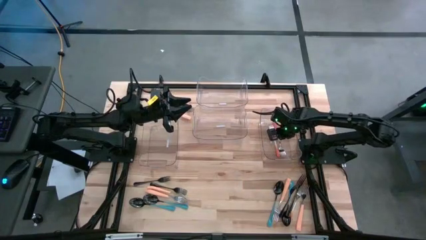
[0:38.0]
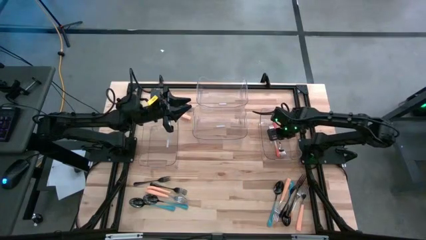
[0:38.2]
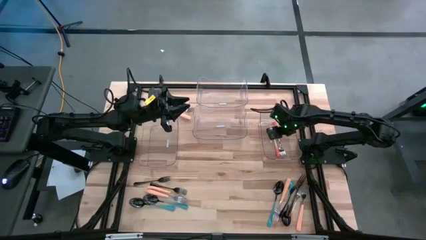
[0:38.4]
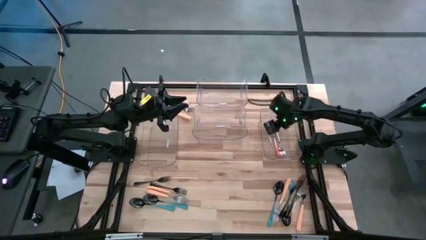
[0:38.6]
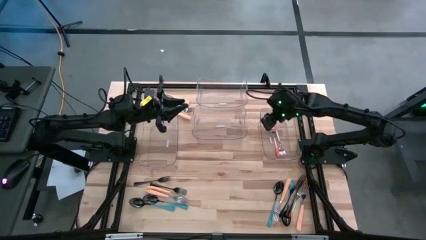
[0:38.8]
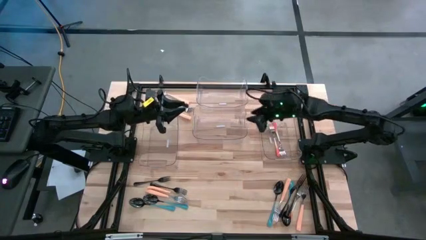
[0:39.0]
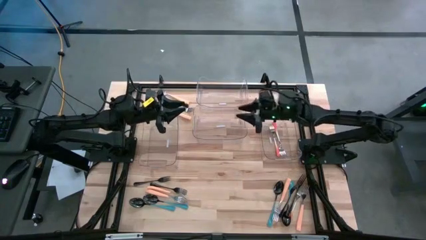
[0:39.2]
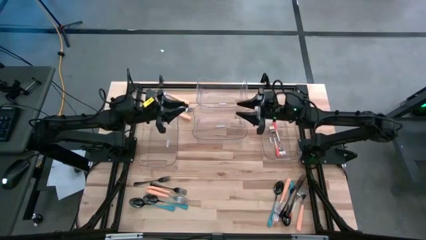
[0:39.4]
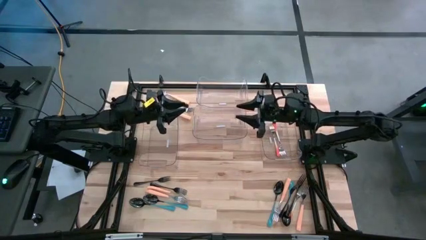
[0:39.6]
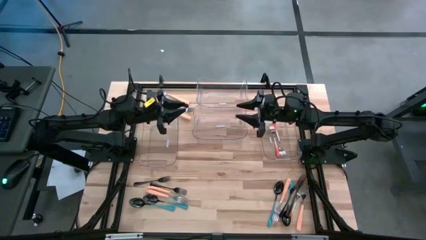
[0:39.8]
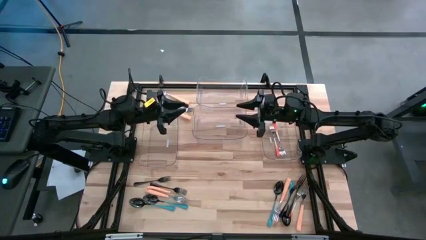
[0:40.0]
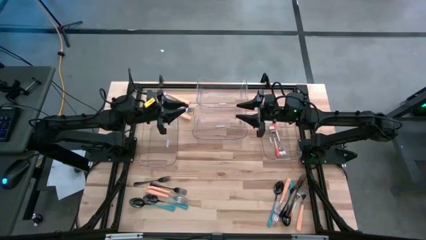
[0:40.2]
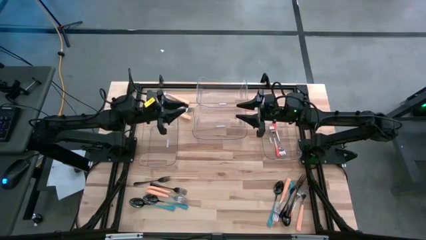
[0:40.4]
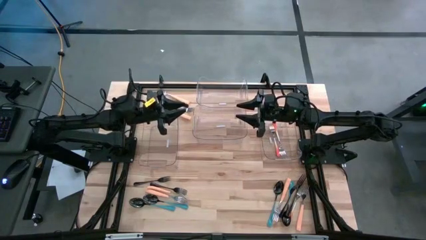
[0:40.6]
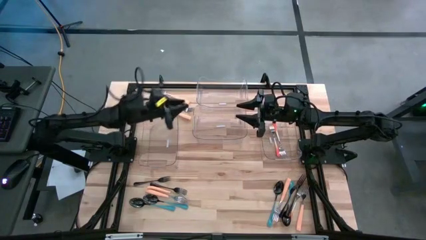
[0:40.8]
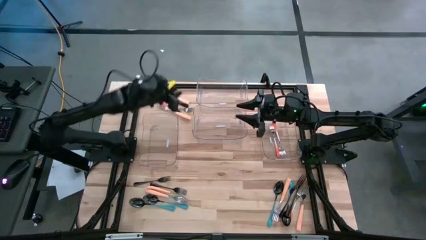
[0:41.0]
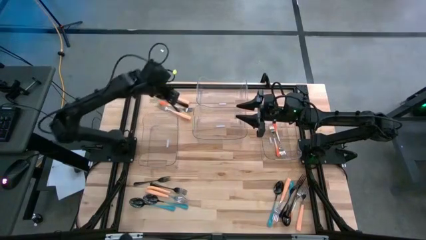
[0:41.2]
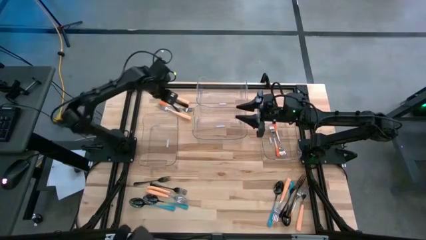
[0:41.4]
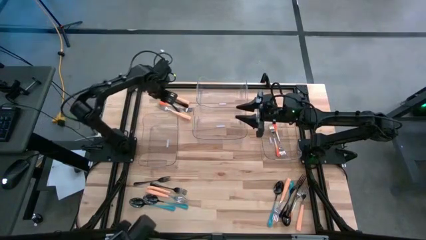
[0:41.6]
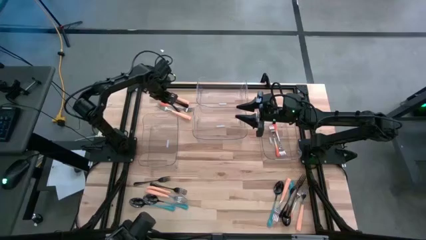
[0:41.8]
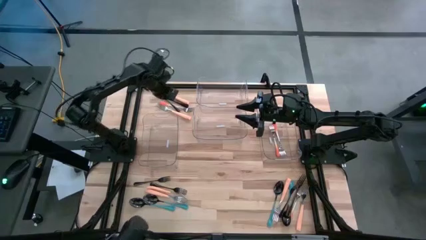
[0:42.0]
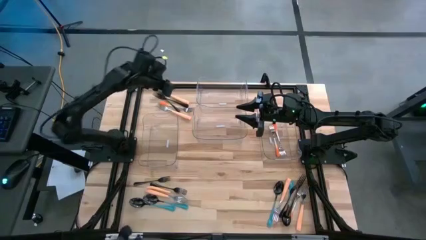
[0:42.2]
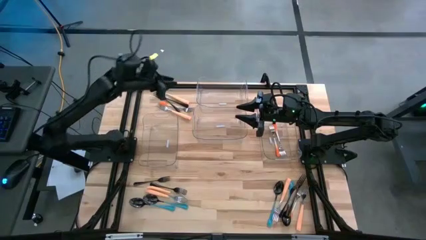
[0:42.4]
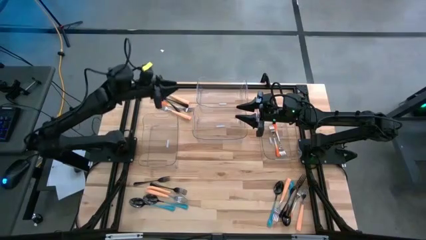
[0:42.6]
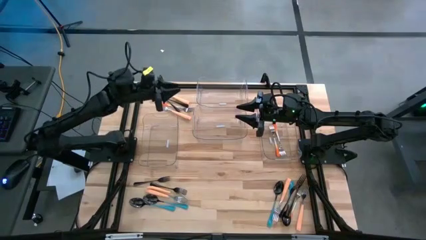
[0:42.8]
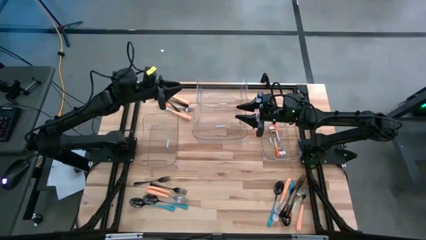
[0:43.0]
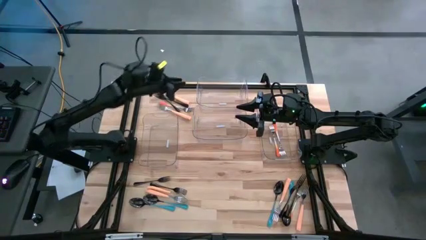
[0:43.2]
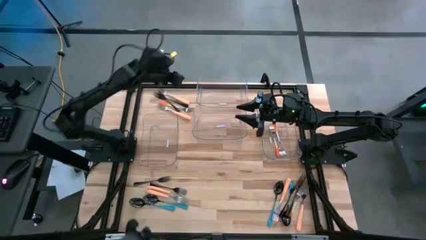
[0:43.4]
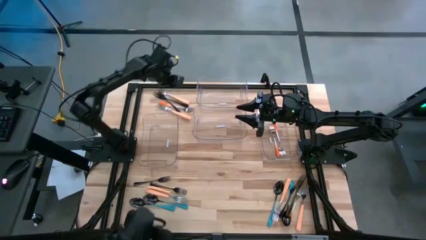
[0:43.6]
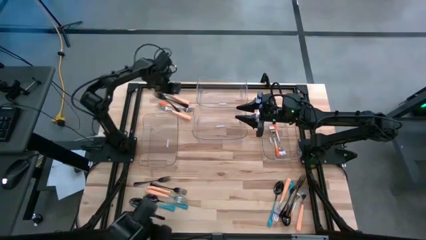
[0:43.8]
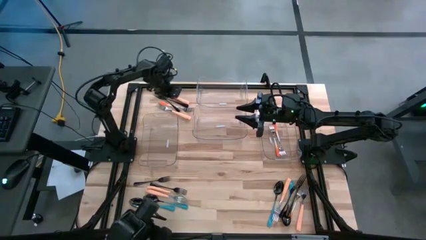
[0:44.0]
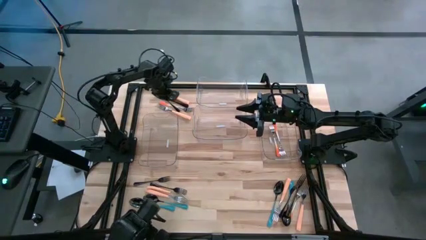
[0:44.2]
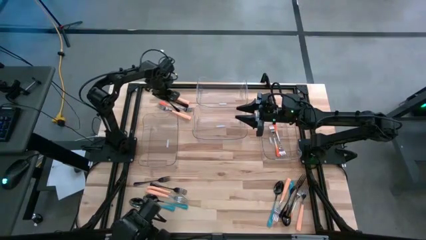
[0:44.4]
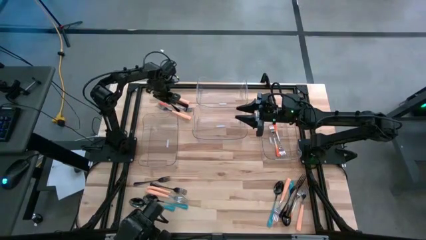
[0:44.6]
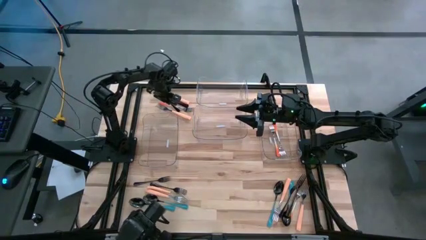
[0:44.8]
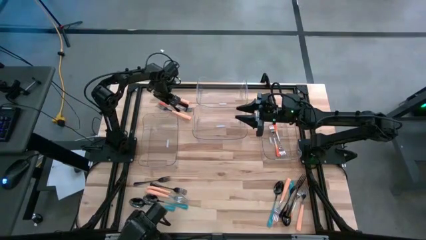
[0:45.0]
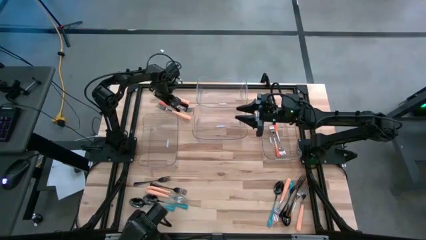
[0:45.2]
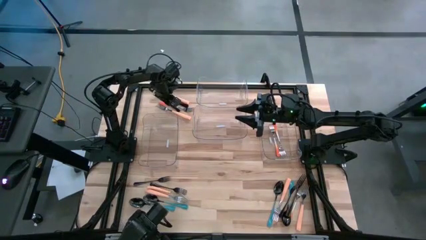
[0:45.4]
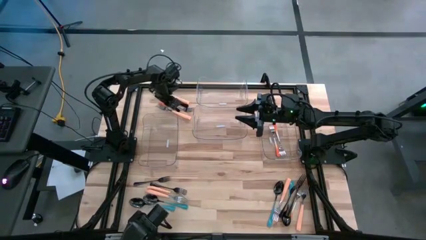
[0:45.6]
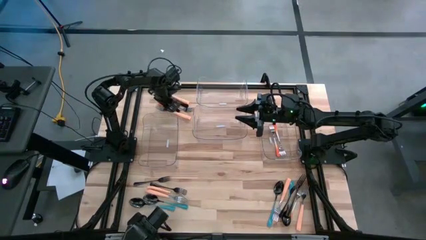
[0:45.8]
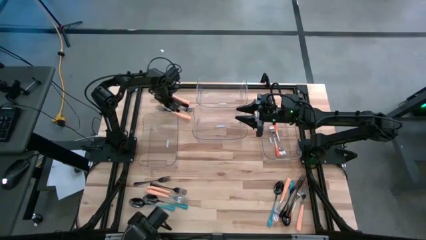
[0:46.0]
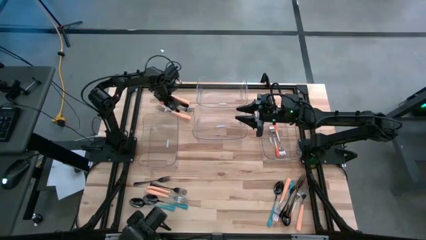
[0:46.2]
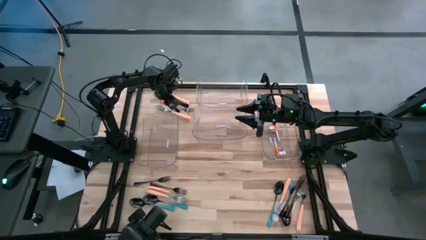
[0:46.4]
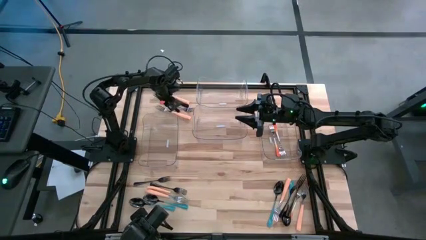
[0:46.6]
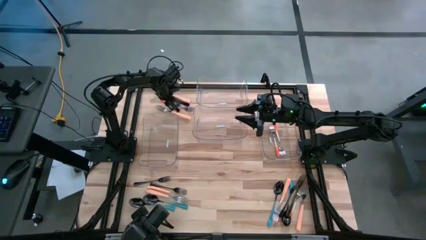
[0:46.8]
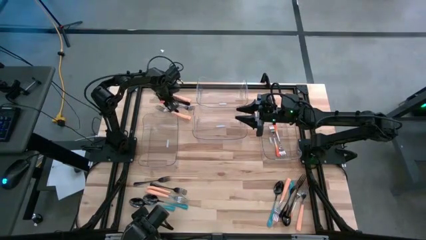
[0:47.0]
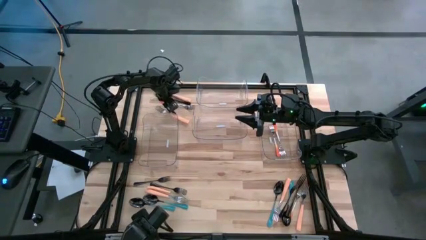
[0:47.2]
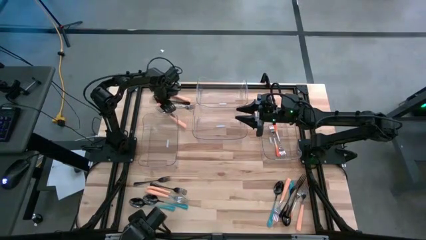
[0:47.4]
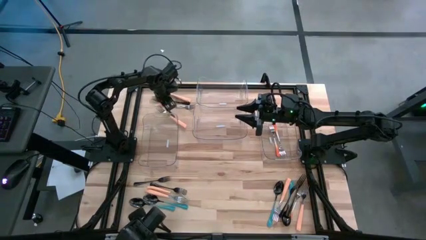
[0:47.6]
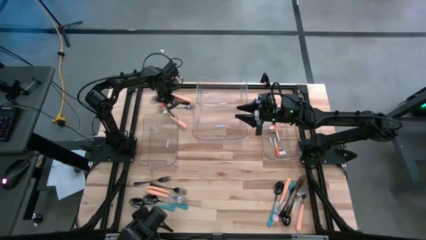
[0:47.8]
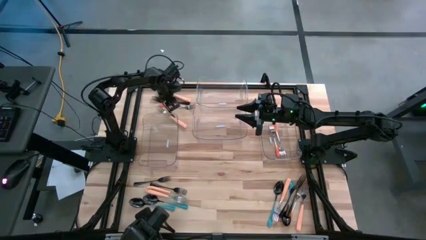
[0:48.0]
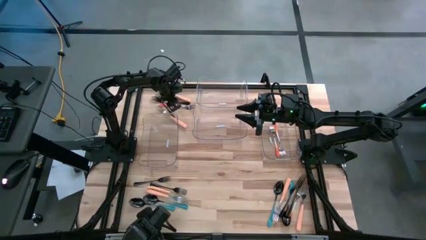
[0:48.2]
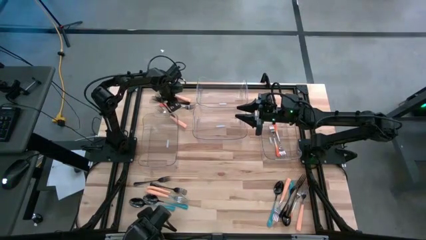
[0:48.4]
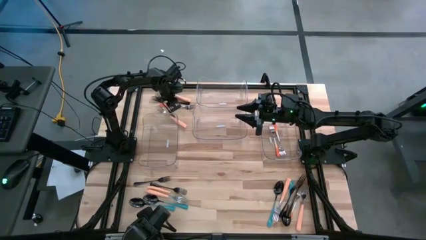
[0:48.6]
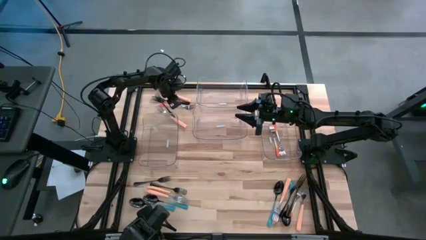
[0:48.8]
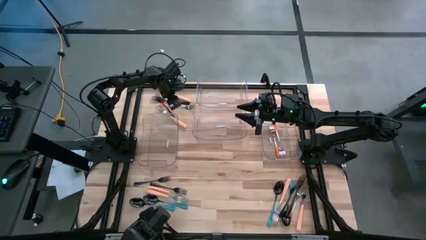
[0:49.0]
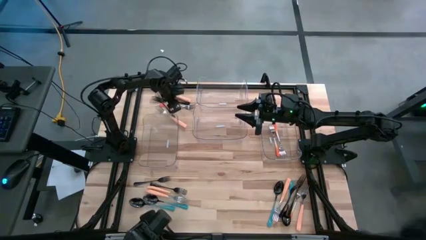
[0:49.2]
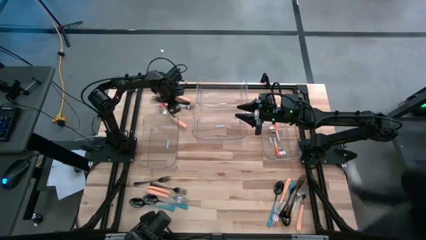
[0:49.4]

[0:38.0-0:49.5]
Task: Sort silverware by color (type)
Put the orange fork into the bottom right transparent bin
